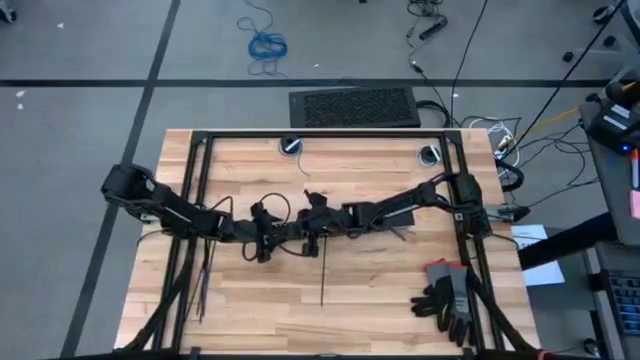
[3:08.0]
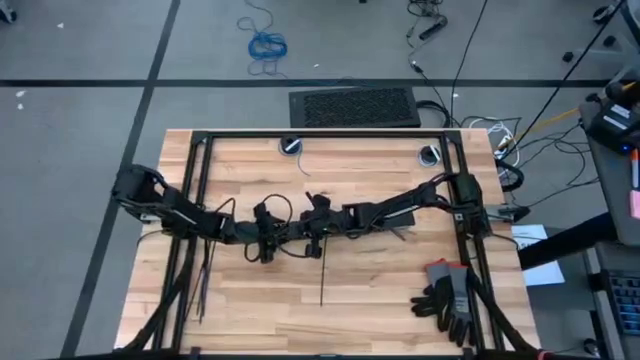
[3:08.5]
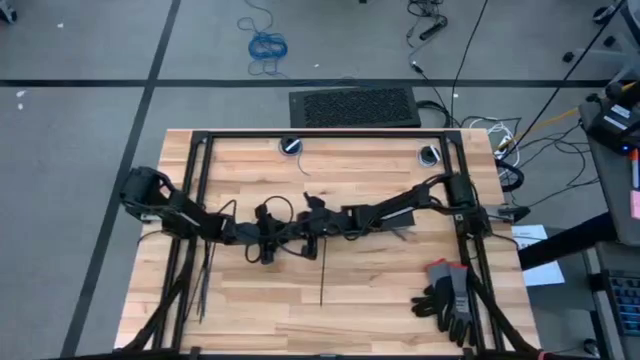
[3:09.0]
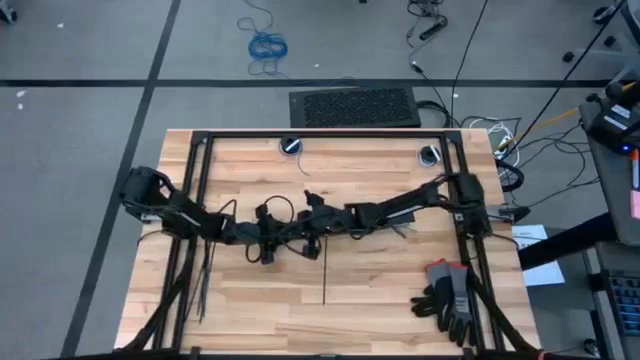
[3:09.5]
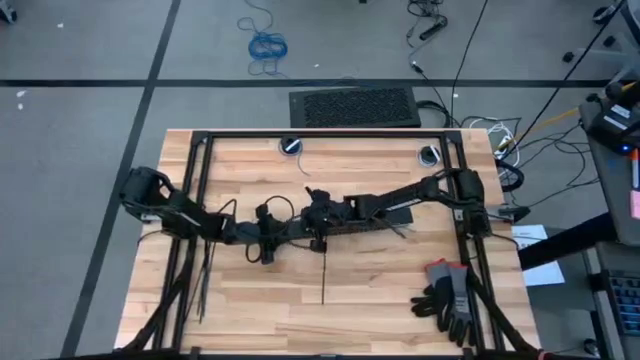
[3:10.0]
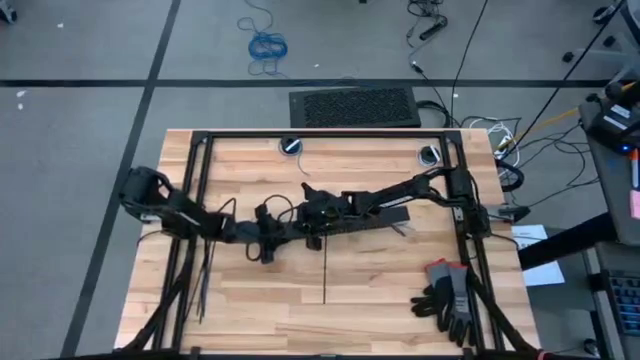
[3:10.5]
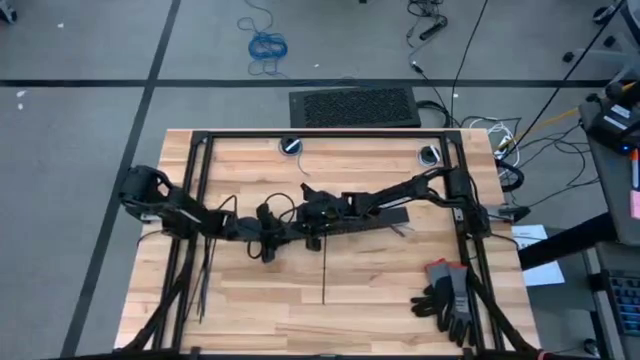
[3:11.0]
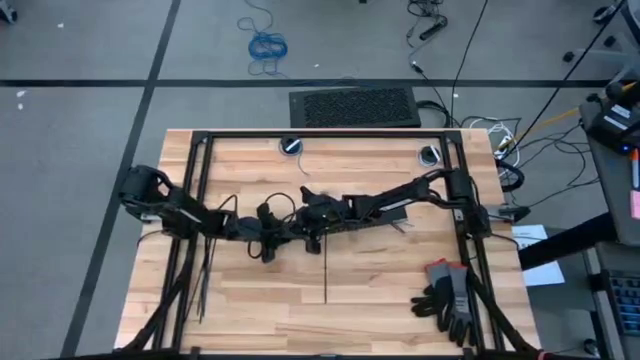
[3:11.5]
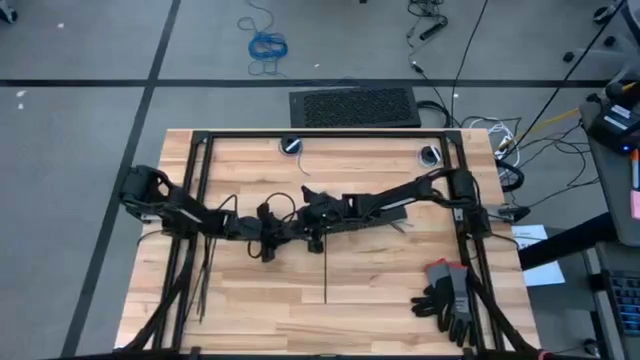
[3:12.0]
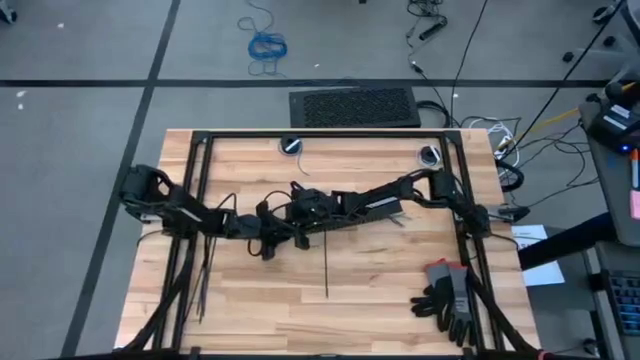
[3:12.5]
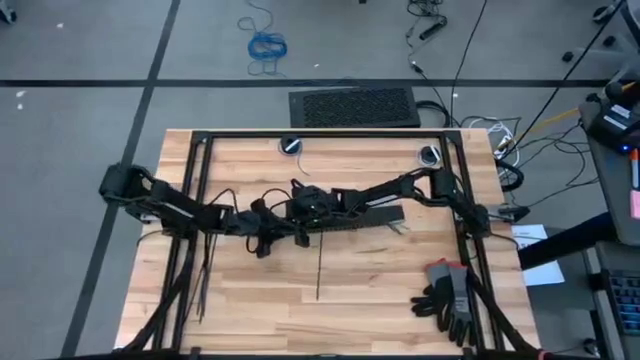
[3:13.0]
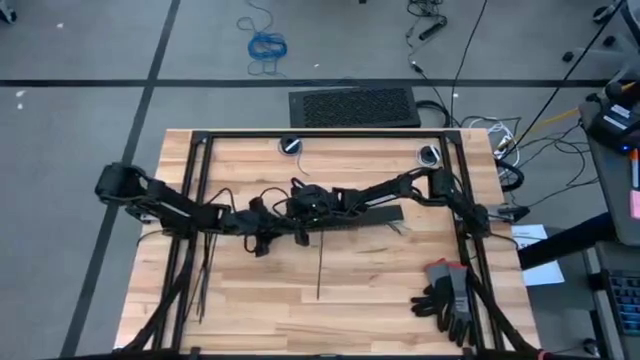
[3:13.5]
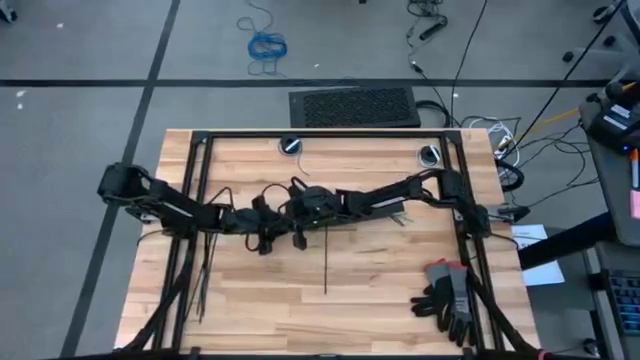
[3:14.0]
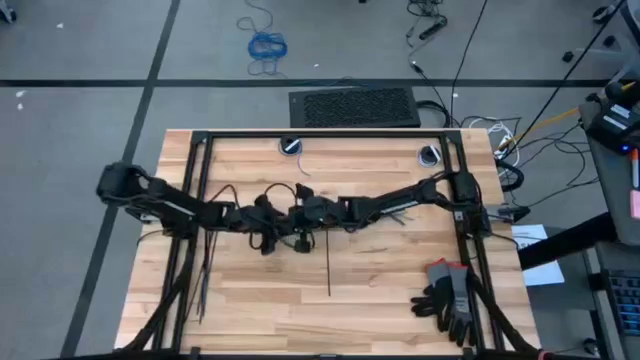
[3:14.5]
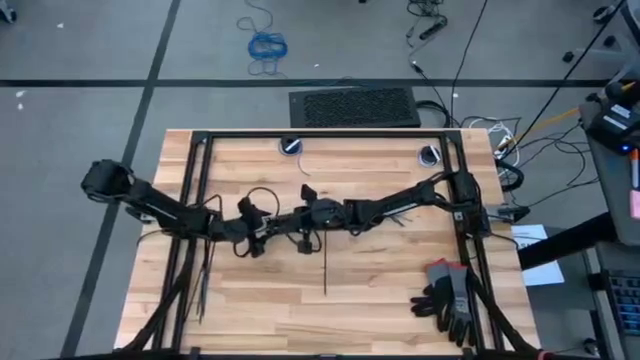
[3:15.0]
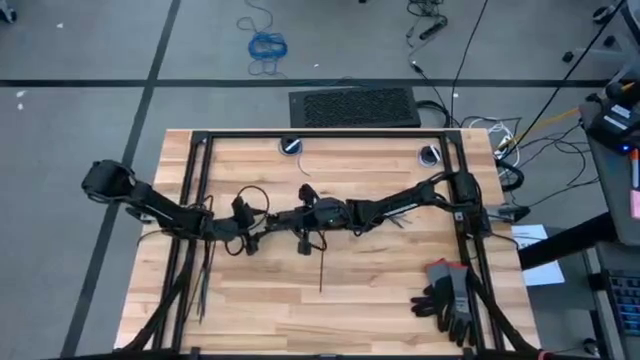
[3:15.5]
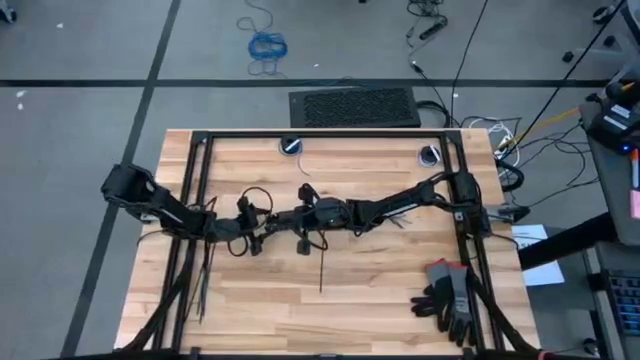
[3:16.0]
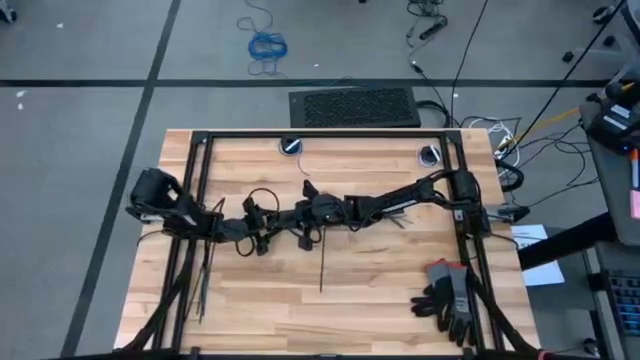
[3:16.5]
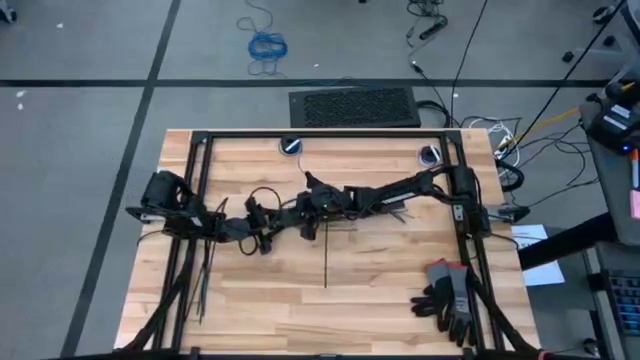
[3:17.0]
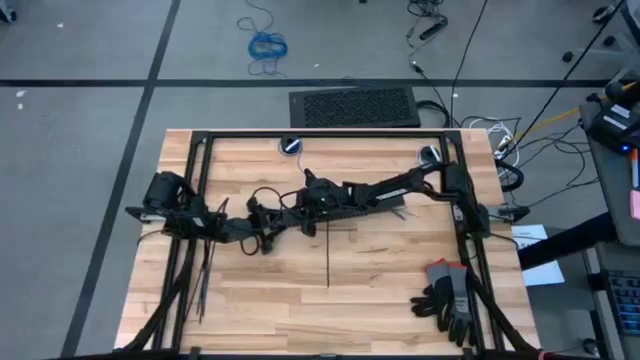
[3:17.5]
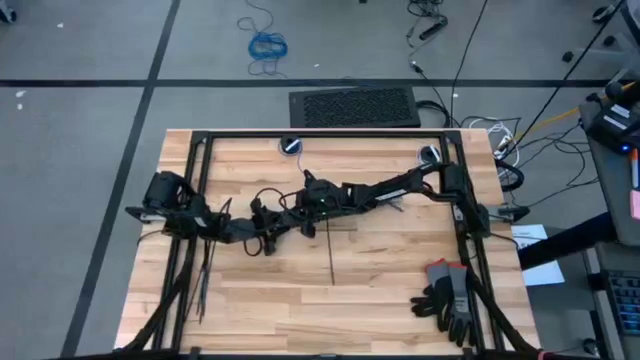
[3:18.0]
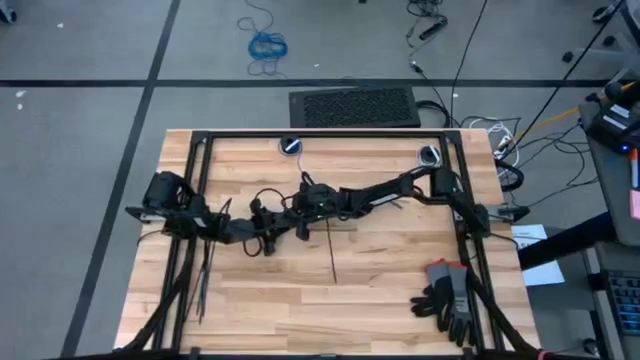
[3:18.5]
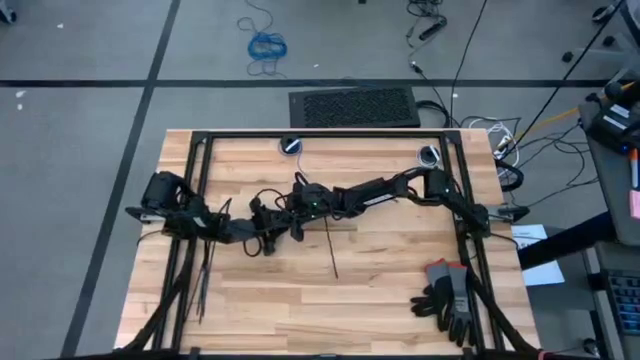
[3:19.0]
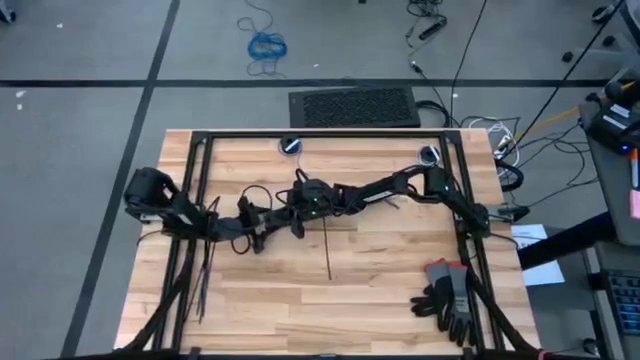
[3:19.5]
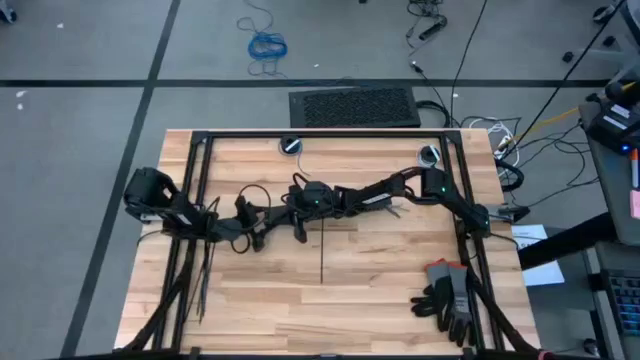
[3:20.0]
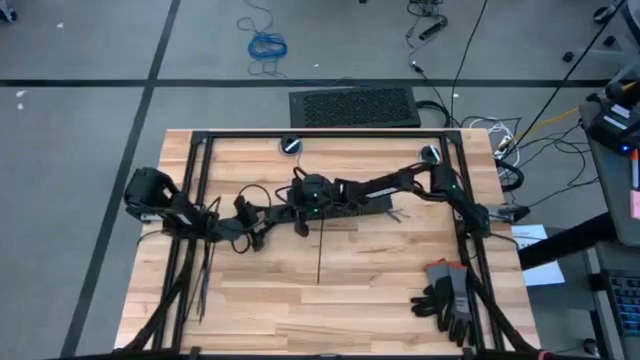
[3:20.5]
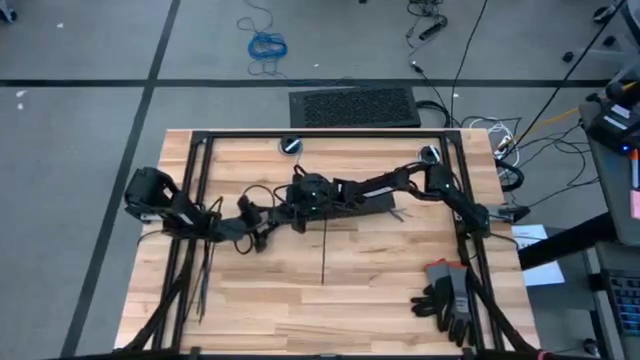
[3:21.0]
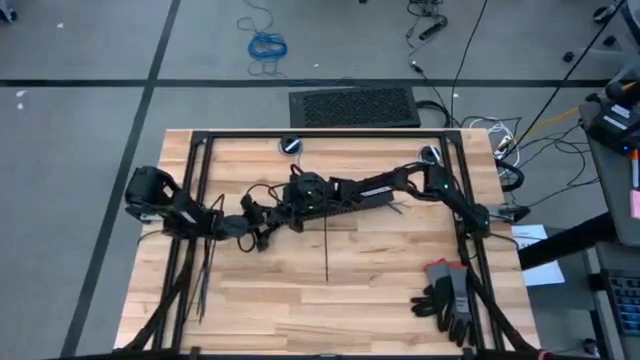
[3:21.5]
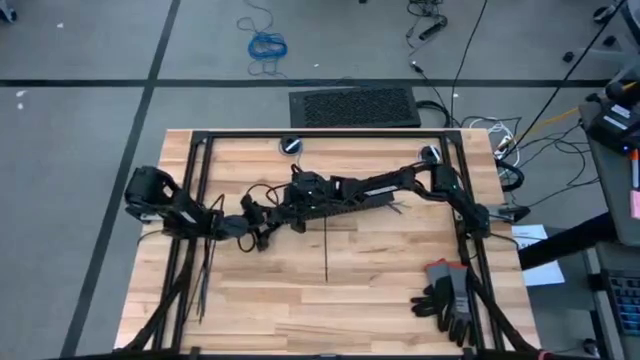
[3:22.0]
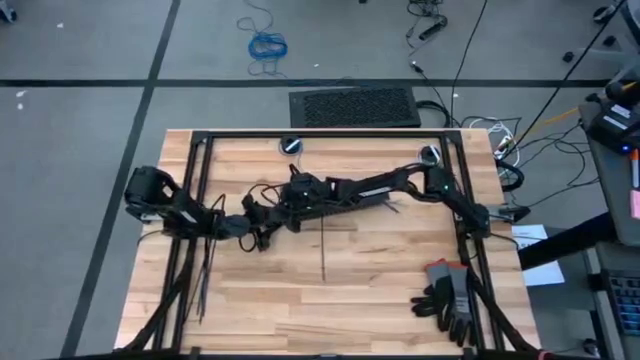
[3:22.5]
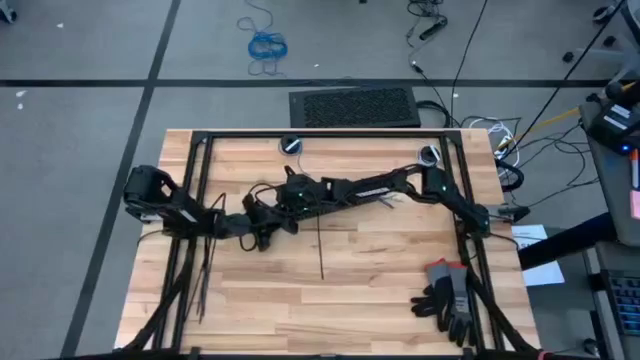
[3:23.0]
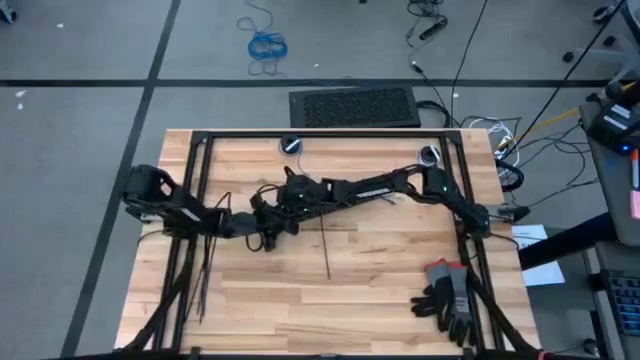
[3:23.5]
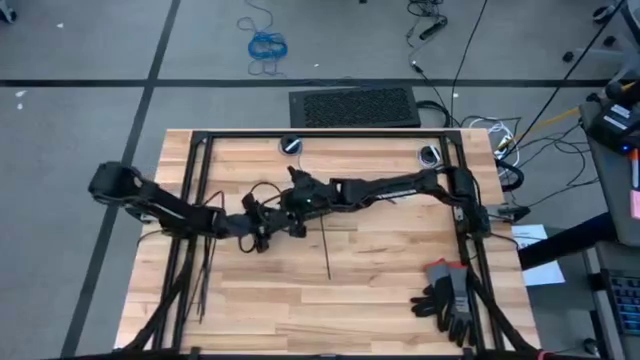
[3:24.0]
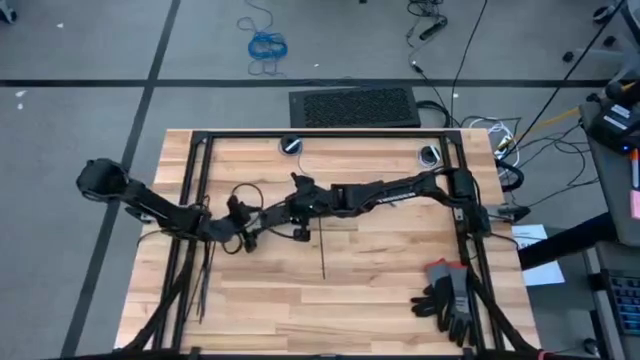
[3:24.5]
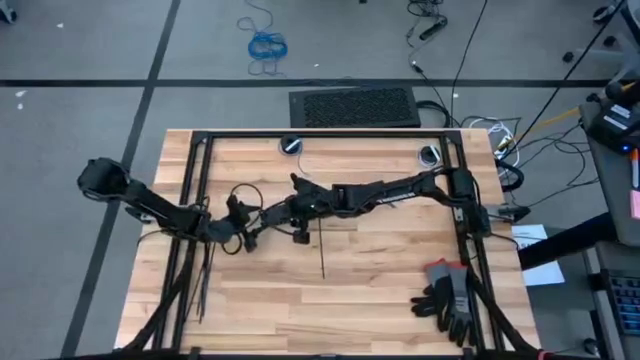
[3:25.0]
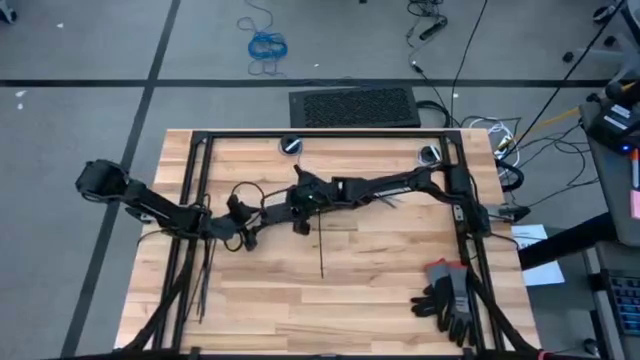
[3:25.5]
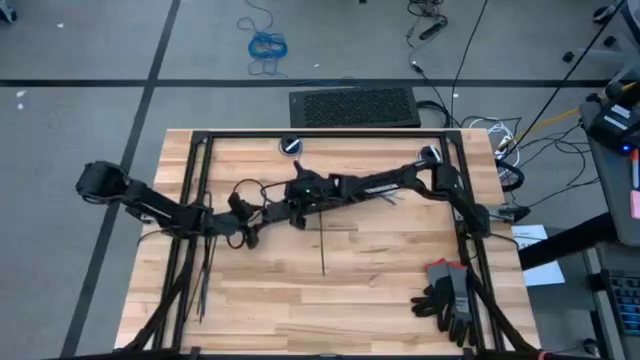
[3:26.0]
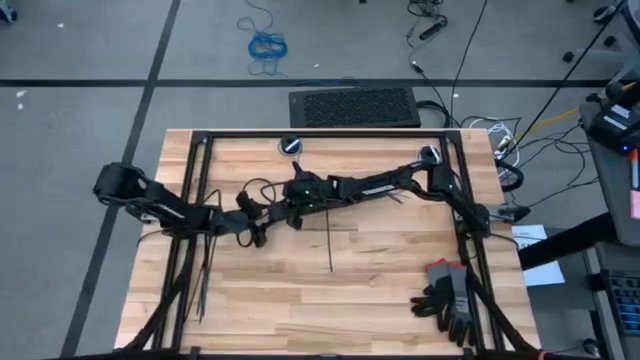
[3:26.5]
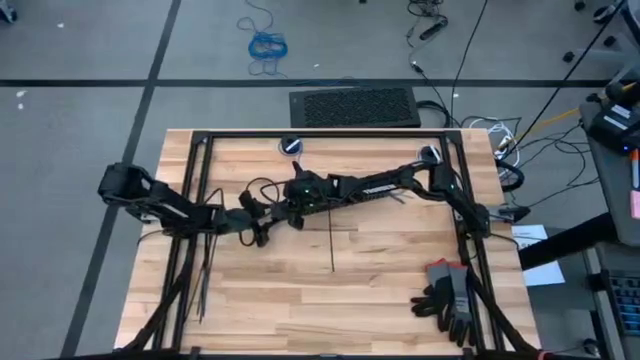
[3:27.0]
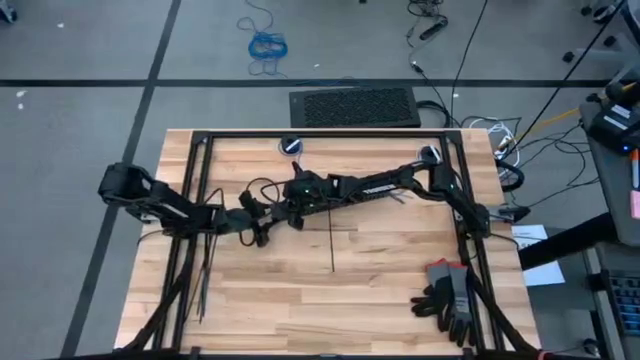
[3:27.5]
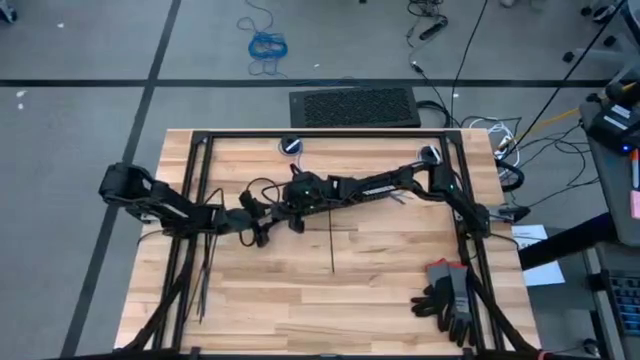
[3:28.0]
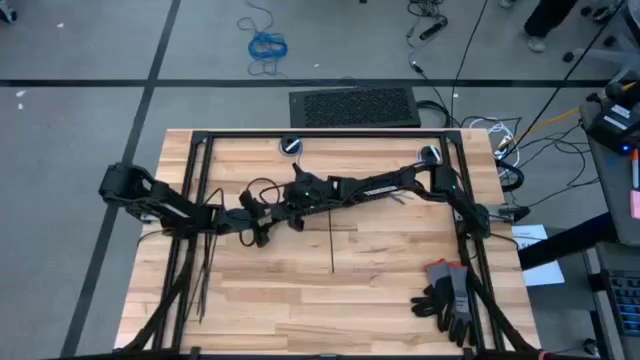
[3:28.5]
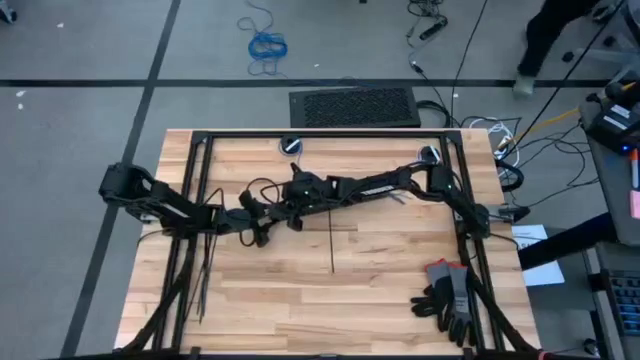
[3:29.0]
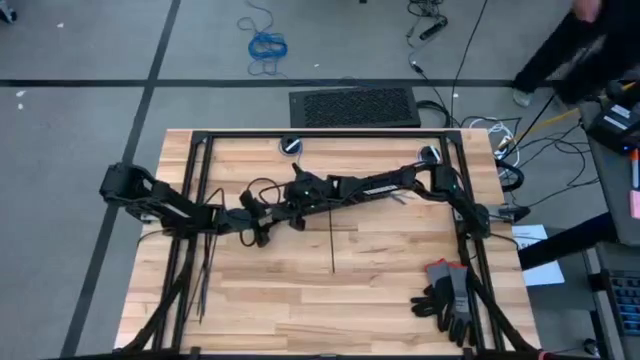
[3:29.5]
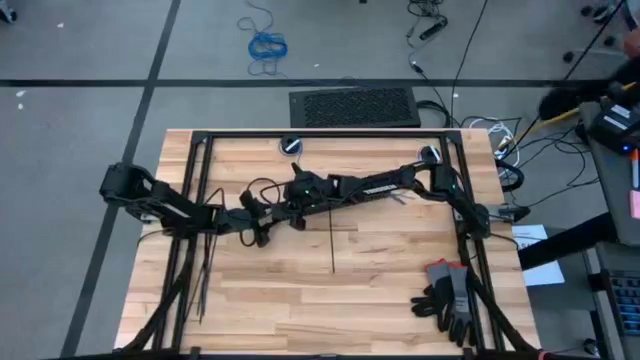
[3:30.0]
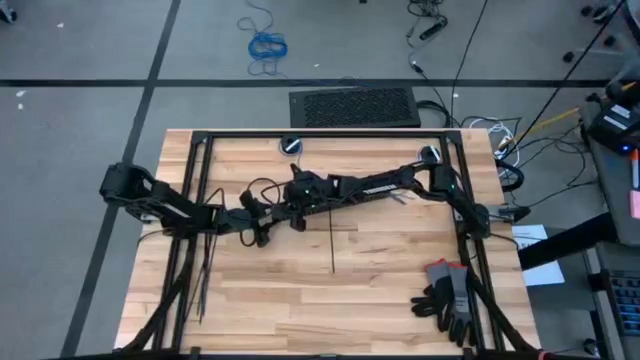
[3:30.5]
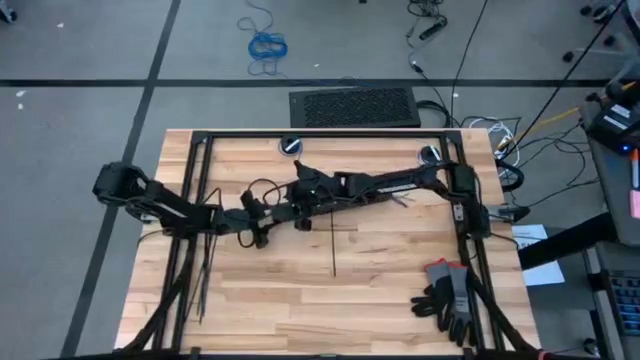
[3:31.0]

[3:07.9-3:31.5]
Task: Ziptie cables
Close the cable duct
